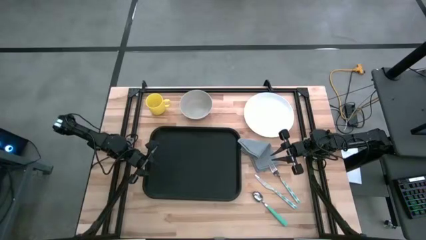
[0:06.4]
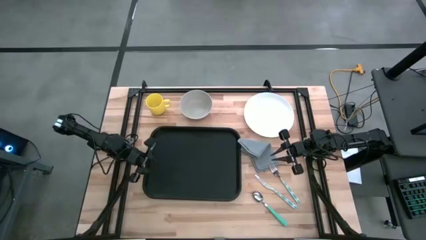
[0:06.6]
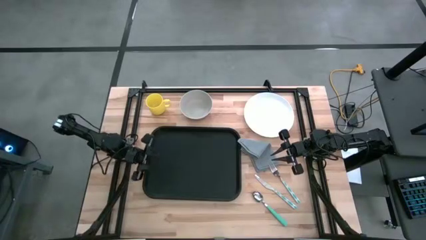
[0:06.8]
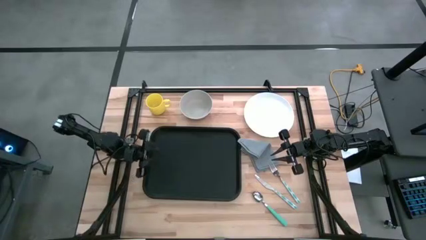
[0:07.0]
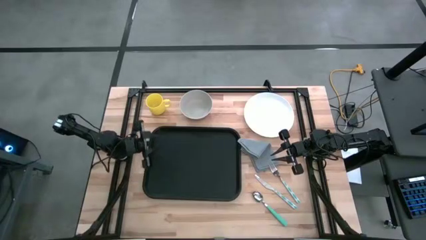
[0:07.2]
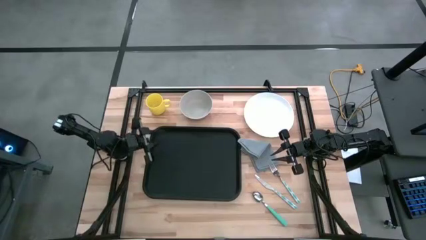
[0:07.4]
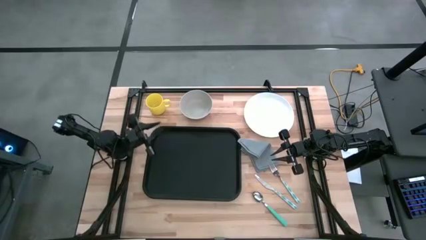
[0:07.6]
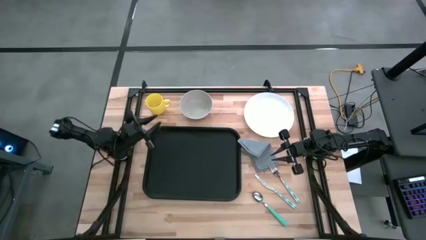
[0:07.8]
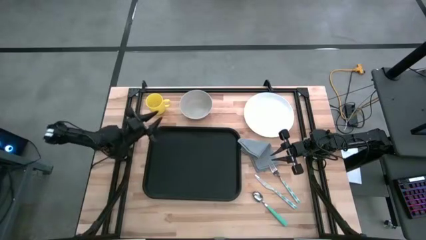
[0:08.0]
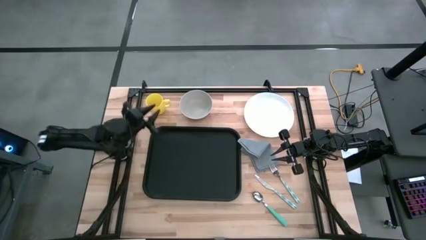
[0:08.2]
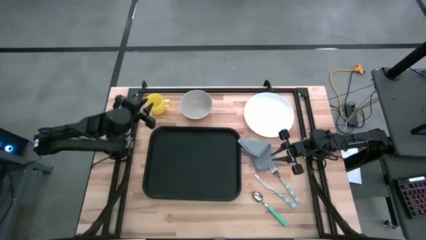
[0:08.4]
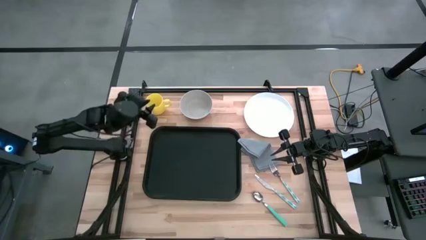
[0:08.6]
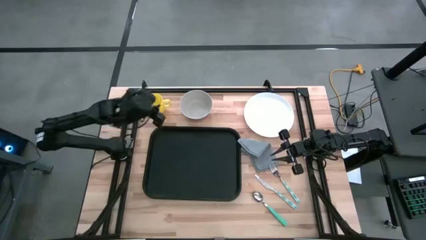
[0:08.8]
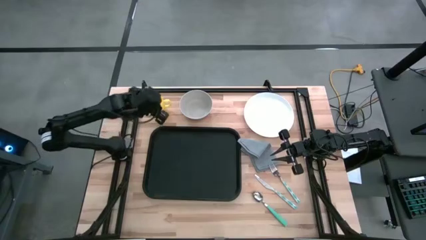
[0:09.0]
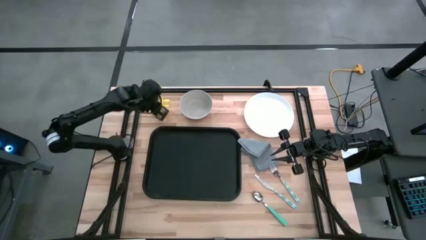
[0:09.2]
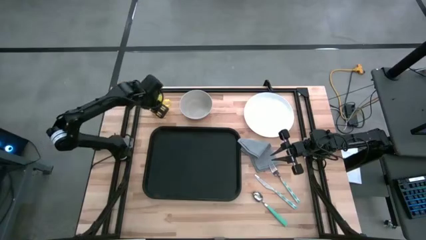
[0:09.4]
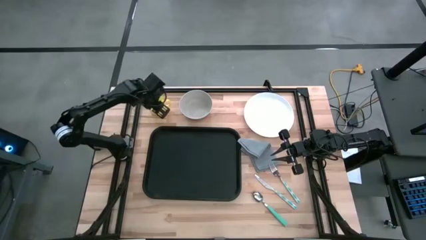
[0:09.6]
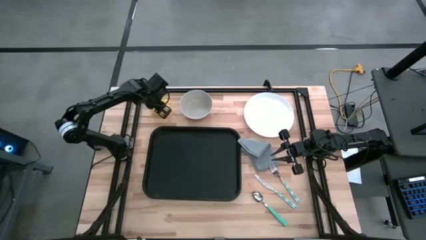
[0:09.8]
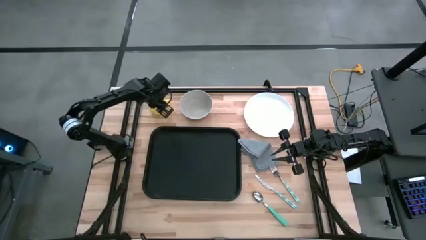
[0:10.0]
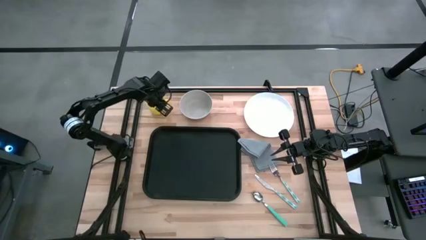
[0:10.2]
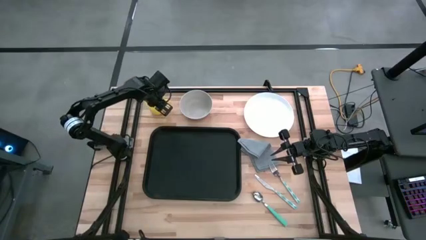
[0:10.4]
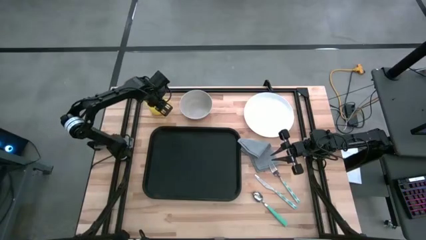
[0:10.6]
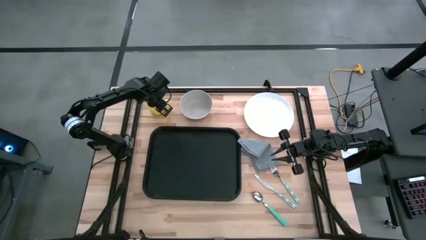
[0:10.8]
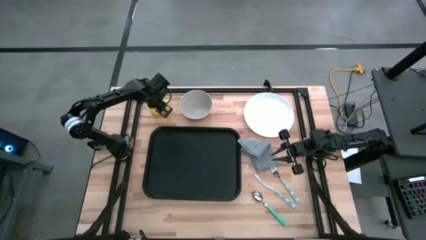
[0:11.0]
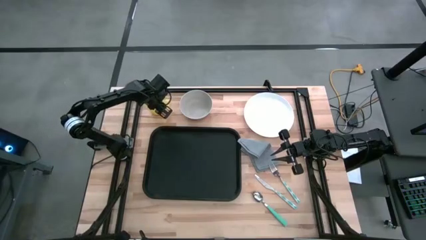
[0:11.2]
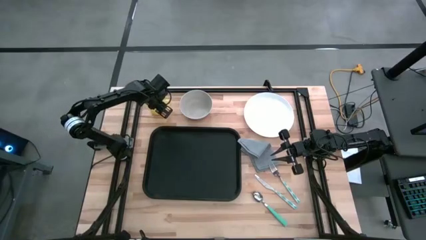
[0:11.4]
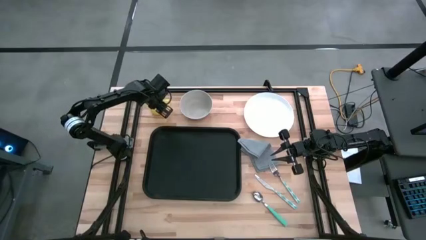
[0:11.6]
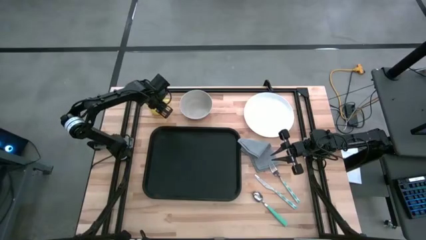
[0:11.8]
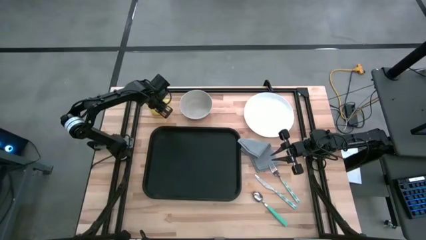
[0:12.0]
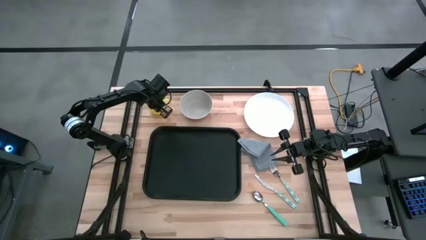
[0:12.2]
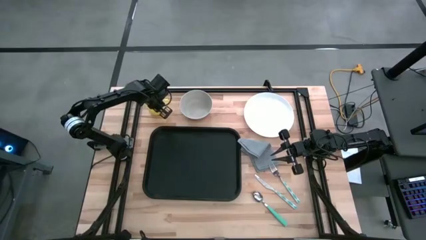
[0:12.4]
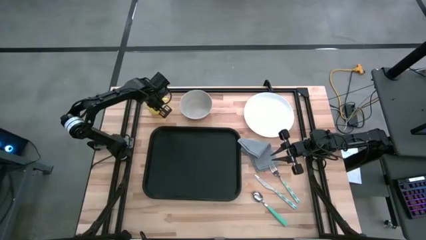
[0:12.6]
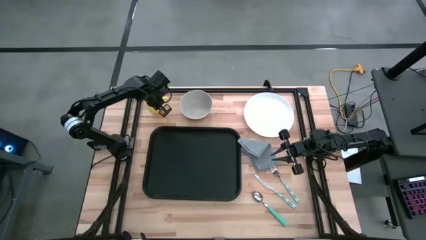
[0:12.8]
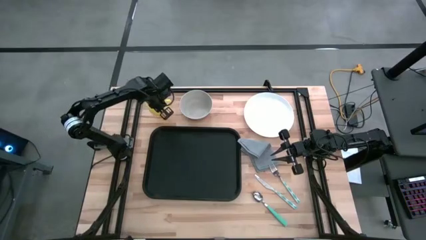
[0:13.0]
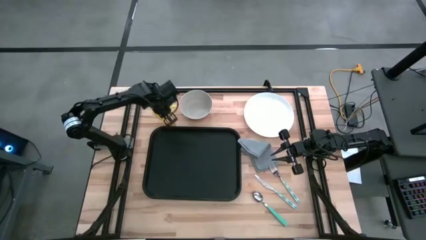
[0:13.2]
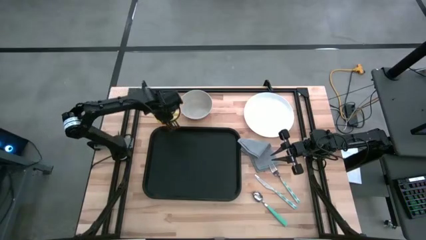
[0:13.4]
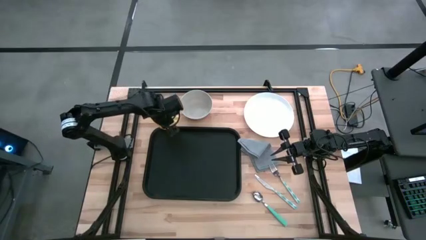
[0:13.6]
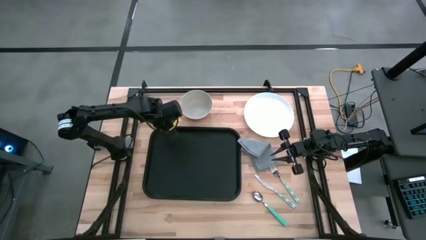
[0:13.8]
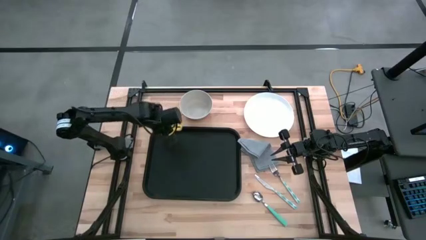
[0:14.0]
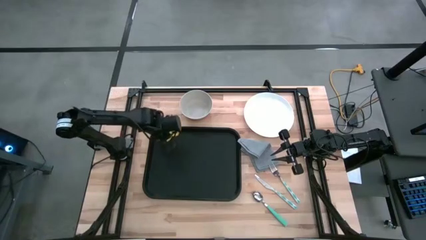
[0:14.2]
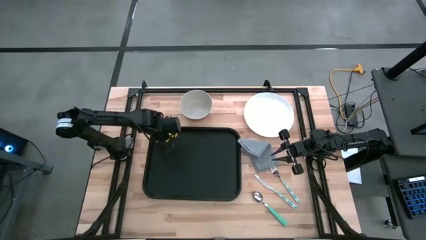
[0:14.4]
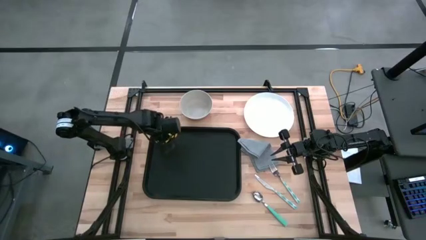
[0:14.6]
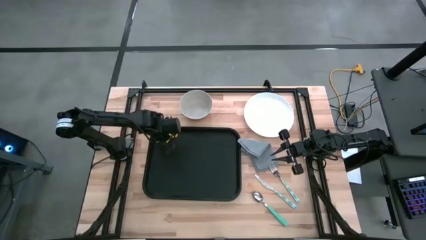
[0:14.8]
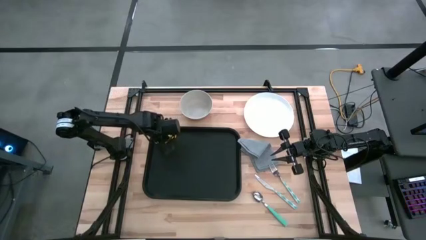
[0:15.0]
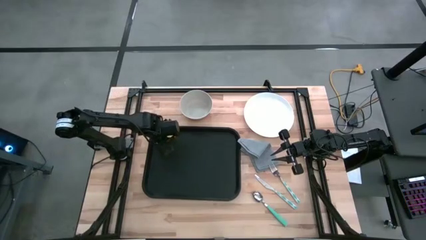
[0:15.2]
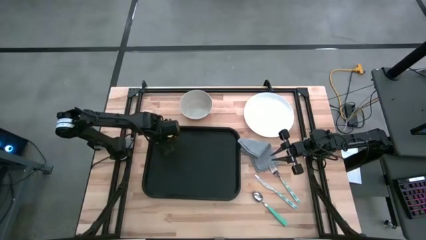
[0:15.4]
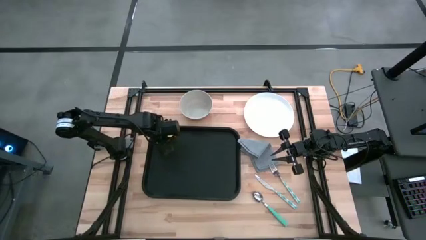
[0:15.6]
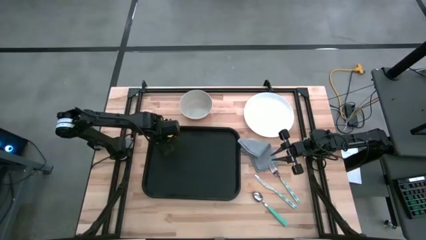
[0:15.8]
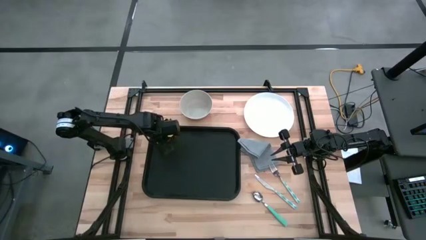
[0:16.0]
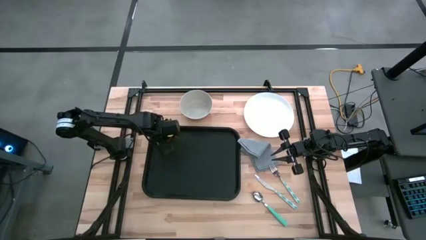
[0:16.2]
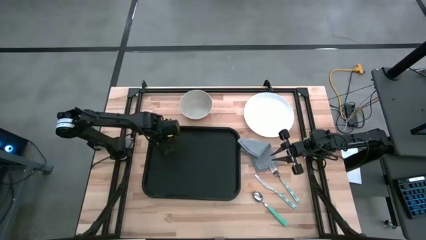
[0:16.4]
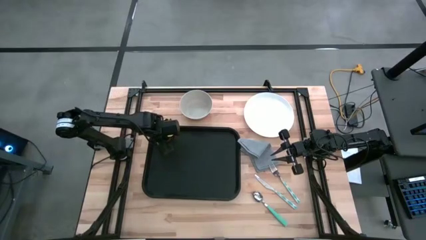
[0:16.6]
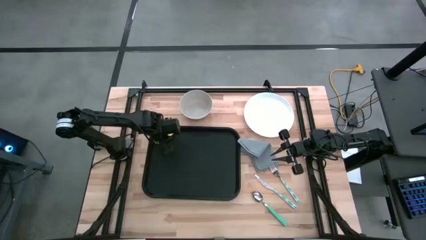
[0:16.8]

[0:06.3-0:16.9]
Task: Set up tray
Put the yellow mug on the top left of the black serving tray

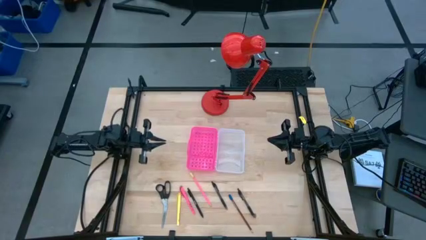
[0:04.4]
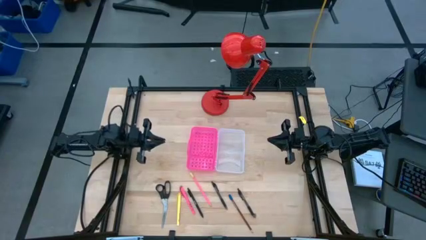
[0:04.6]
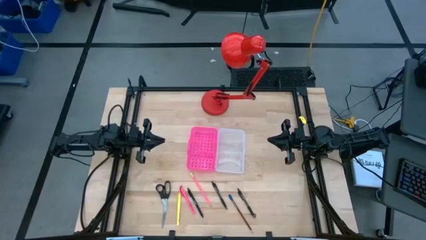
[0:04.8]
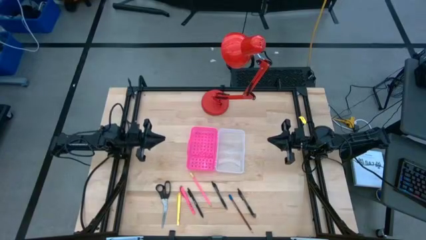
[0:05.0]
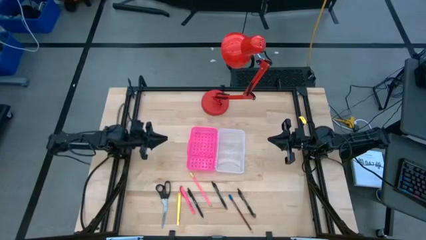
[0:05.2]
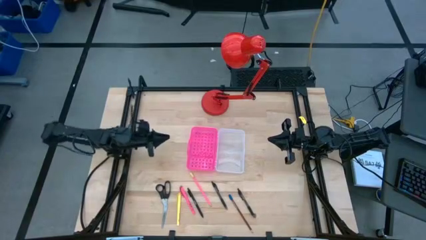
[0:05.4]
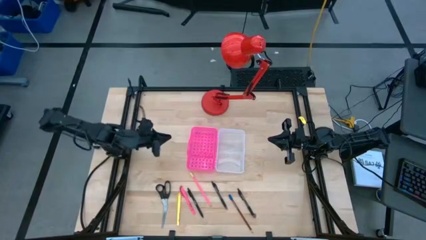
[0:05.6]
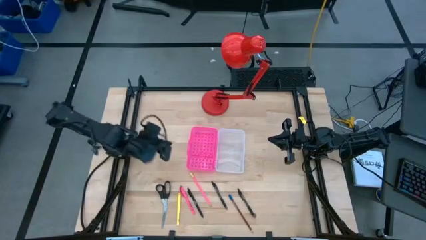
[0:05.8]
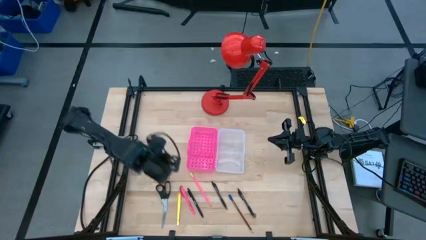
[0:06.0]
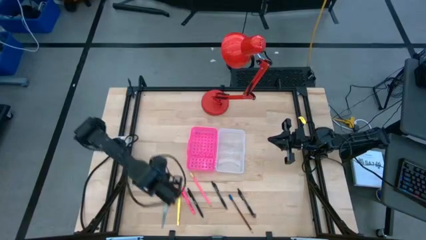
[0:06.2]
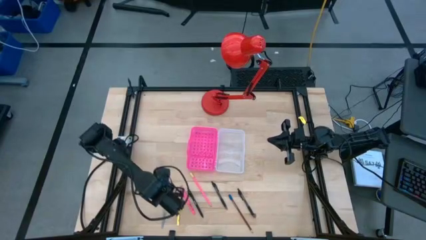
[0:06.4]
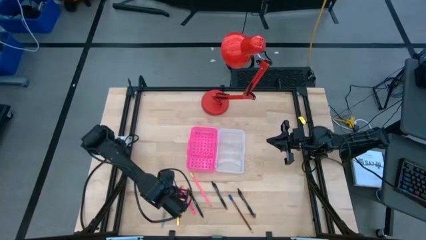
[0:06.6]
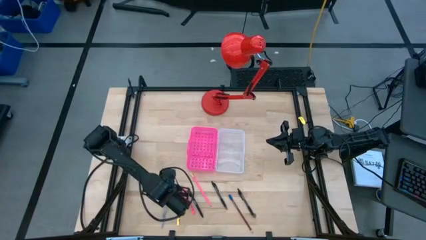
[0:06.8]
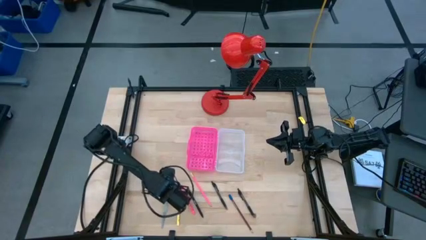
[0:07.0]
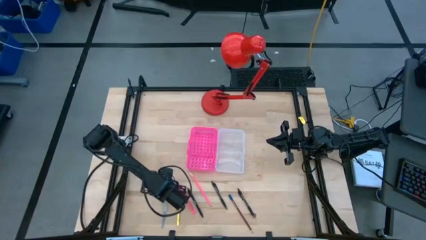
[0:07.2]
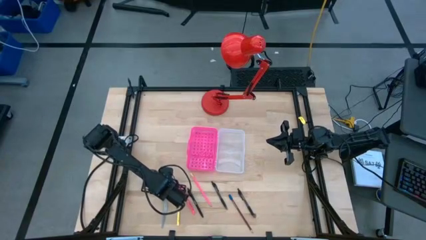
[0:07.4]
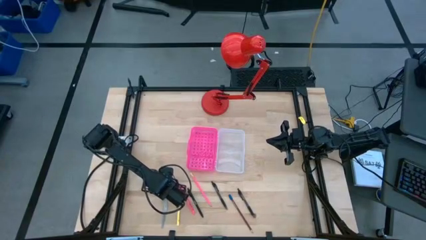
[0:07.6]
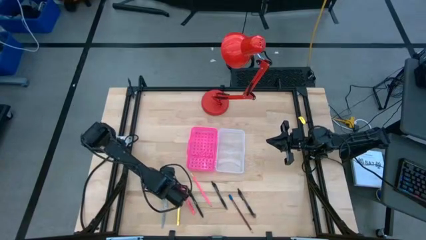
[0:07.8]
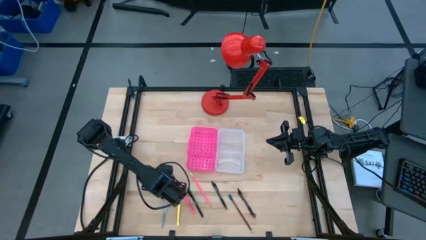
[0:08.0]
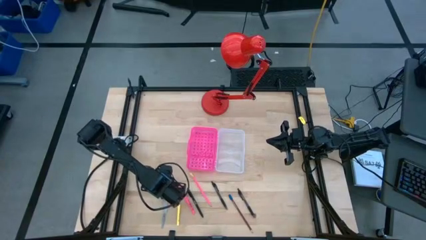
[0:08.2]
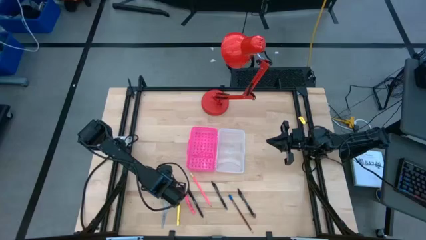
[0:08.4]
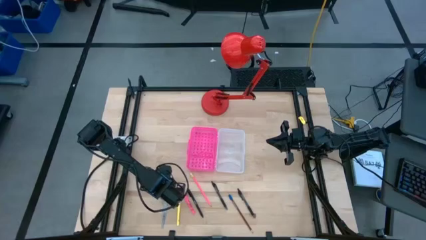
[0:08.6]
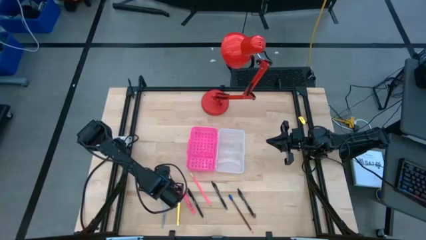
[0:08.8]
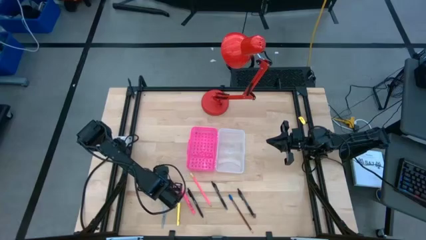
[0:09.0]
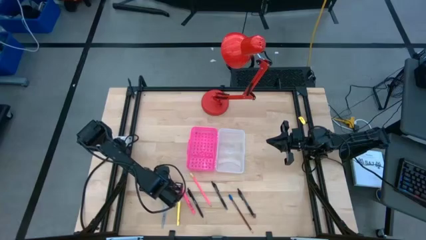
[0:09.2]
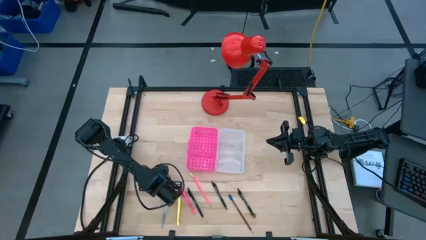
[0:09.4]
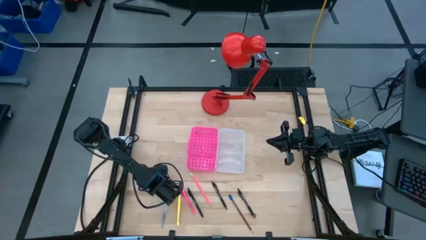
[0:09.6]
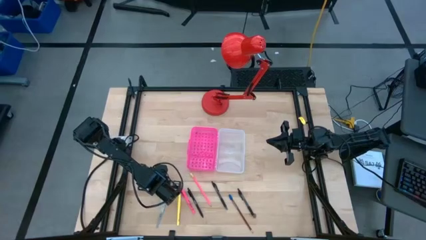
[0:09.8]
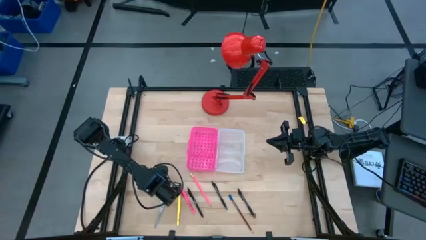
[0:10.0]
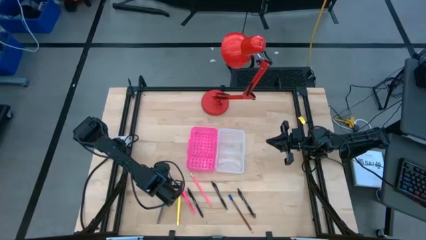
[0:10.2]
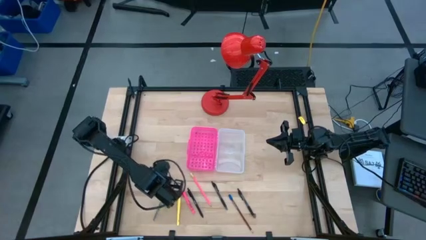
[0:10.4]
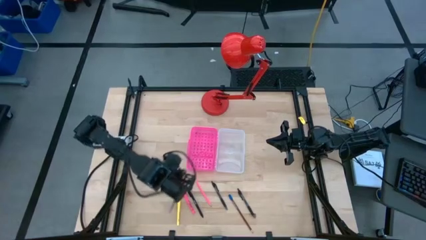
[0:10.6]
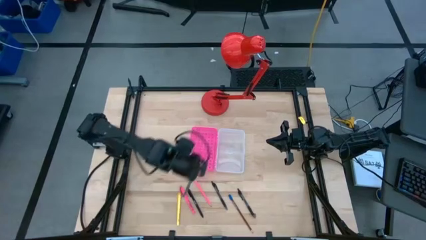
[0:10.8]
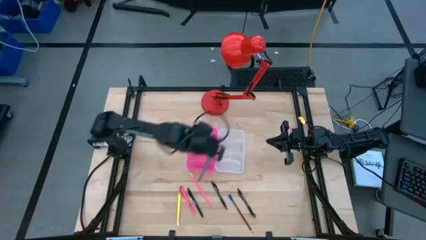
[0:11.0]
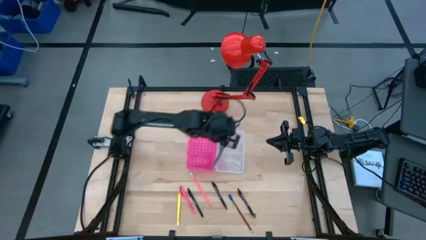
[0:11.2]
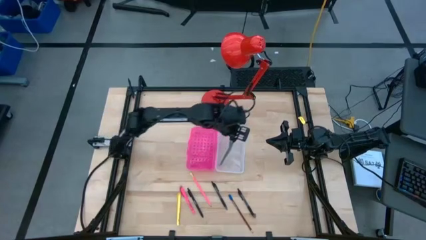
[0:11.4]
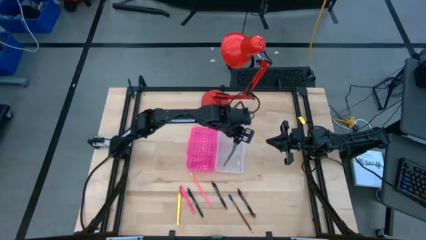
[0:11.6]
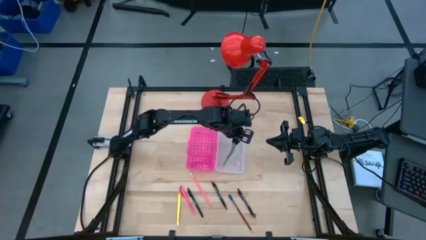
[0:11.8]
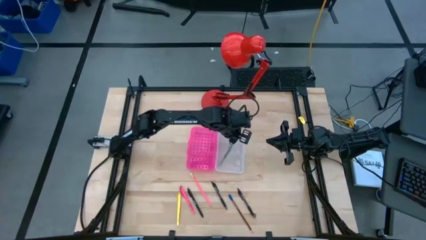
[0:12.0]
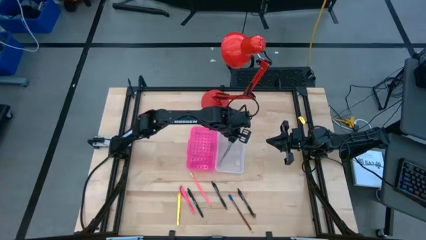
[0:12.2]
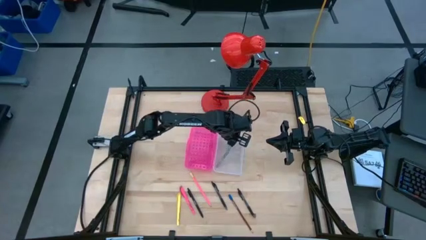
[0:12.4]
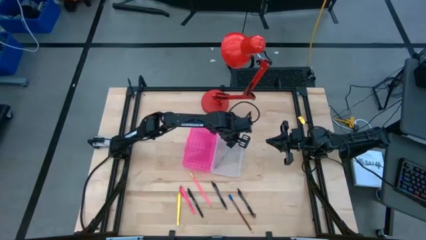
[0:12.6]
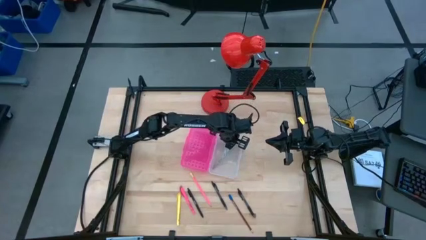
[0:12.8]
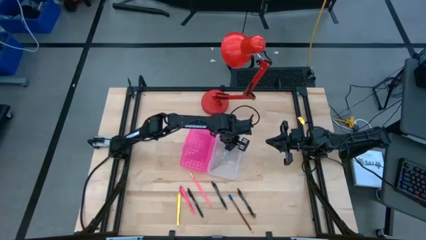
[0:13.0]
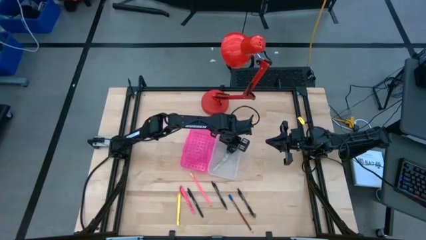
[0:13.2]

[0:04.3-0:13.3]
Task: Pick & place school supplies into a supply box
Put the black scissors into the pink supply box
